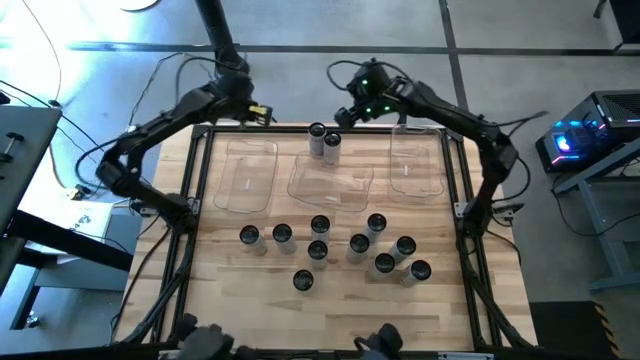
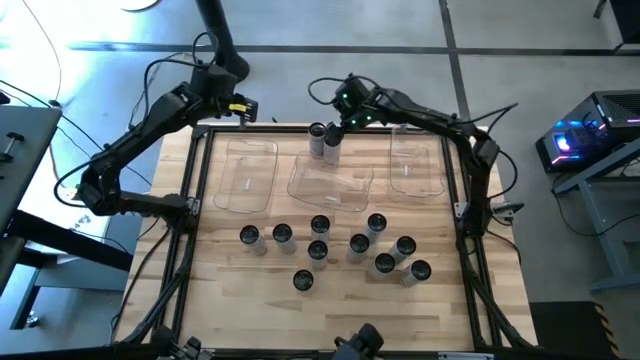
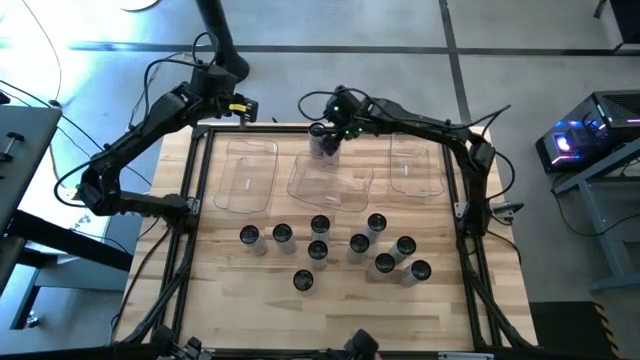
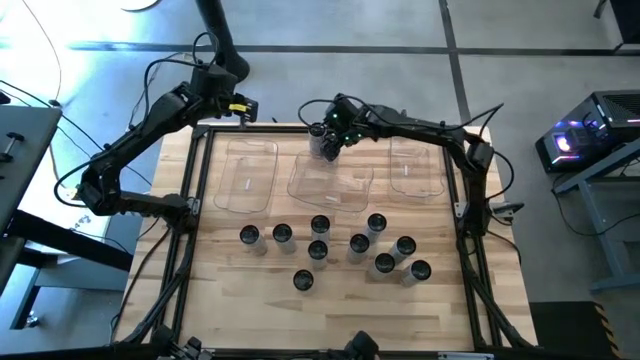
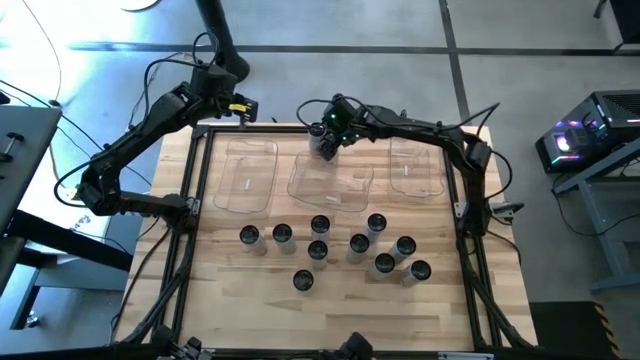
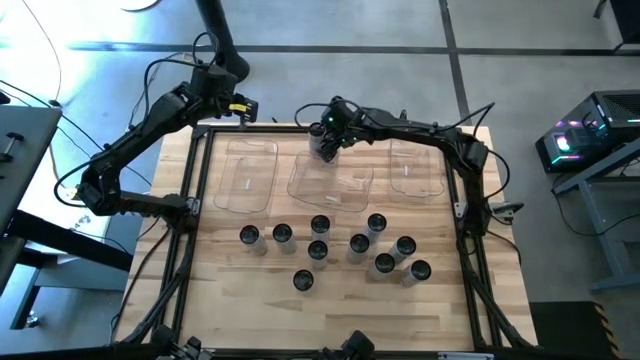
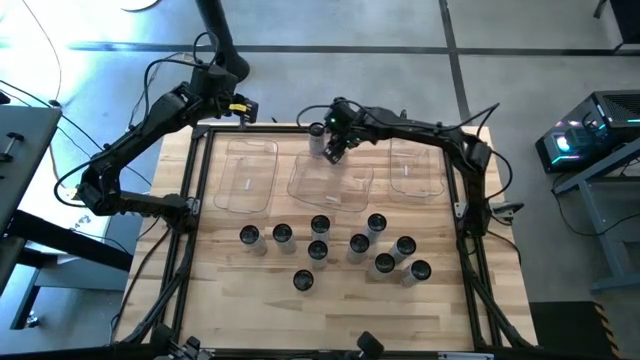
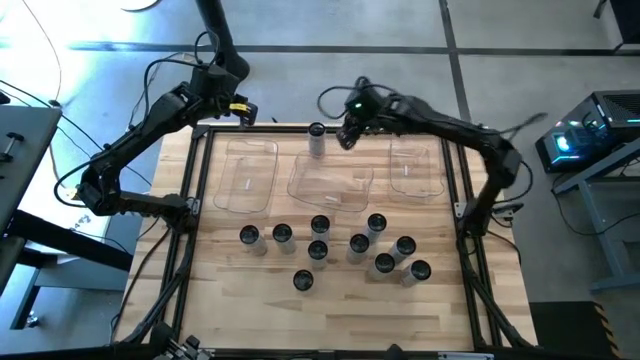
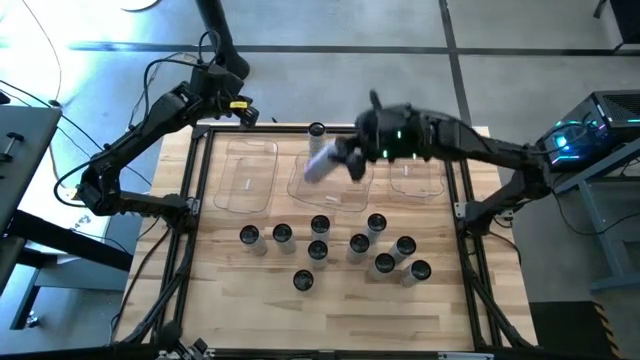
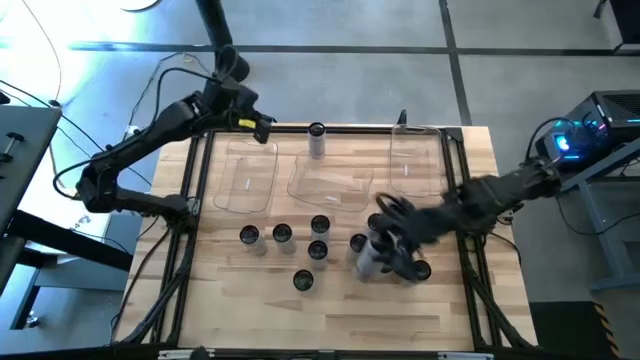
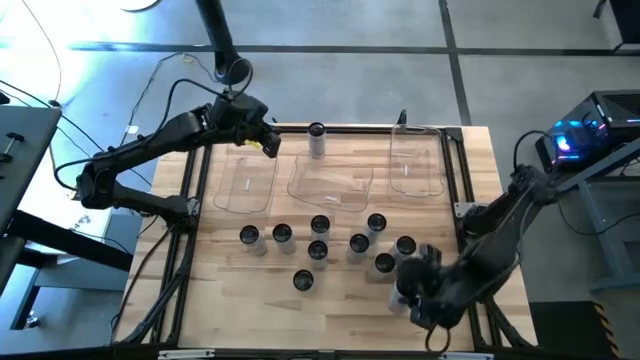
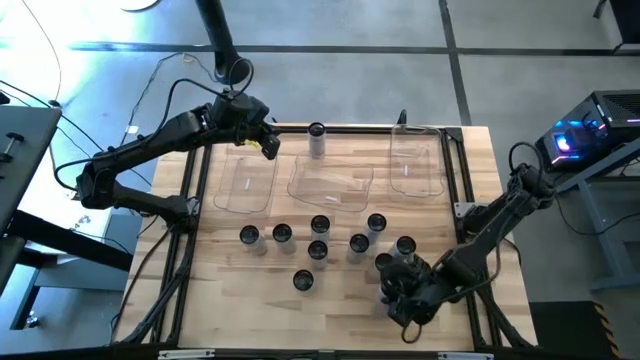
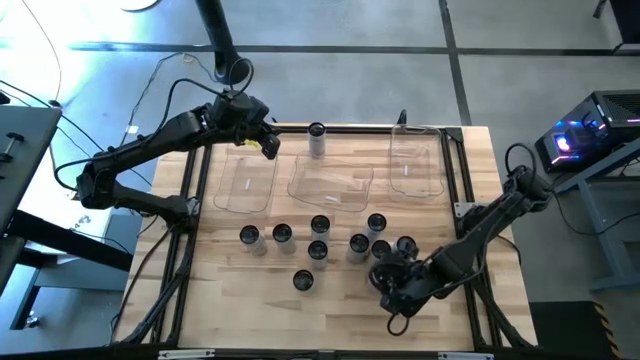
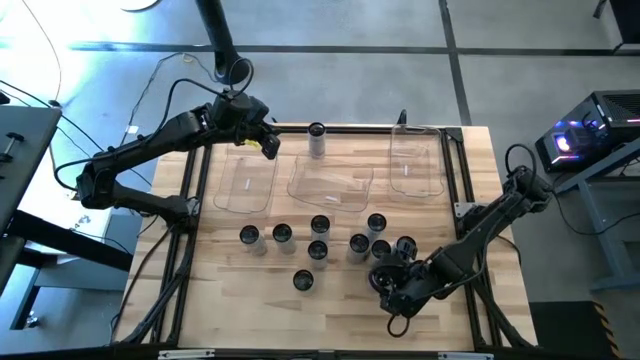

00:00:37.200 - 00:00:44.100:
Task: Sort soda cans
Move the white-pink soda can to the bottom middle of the table

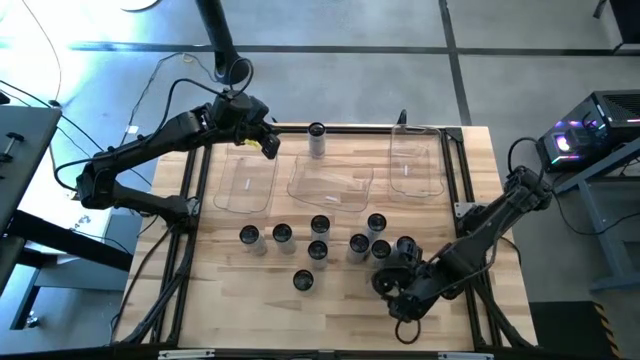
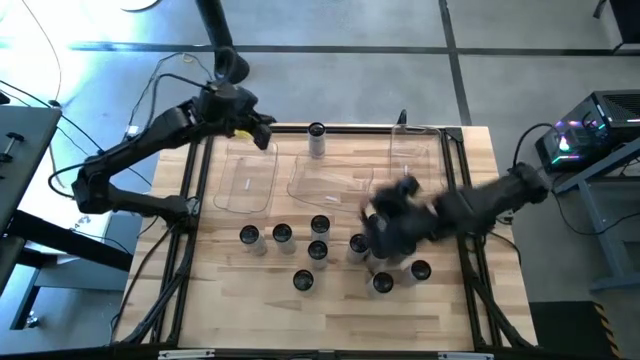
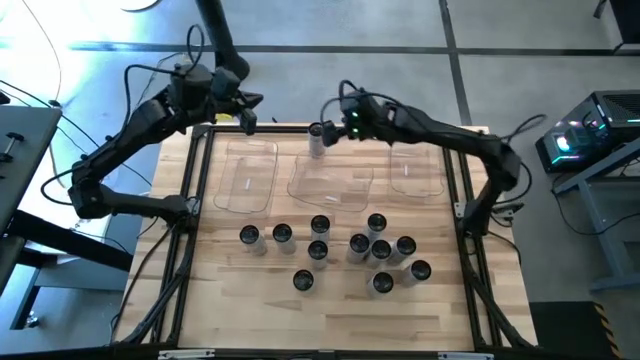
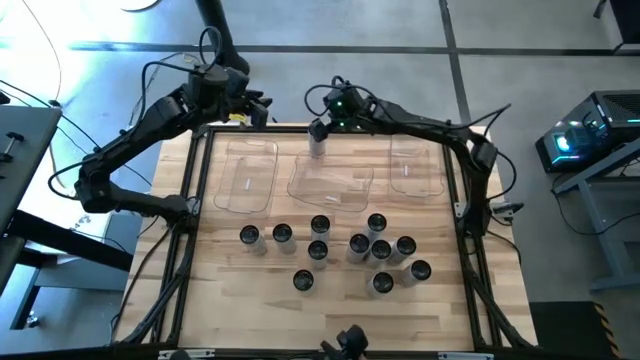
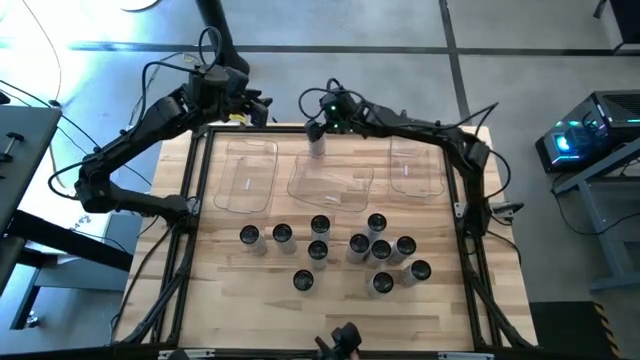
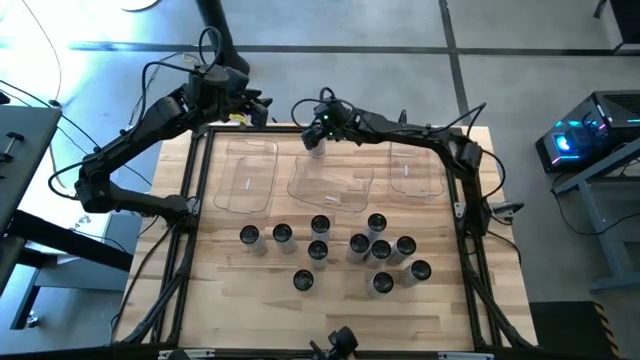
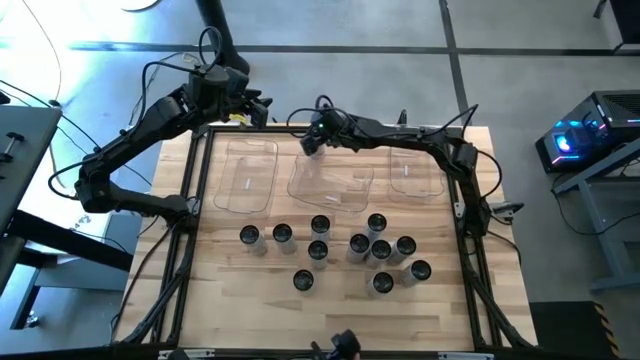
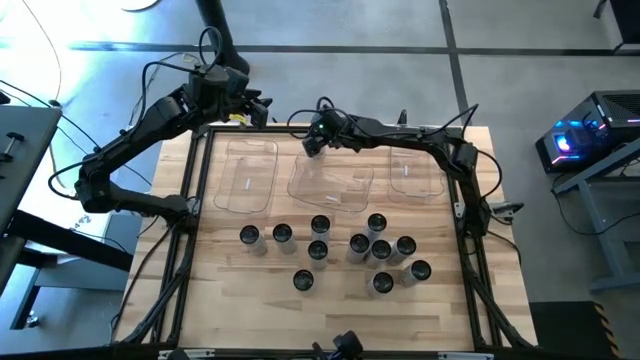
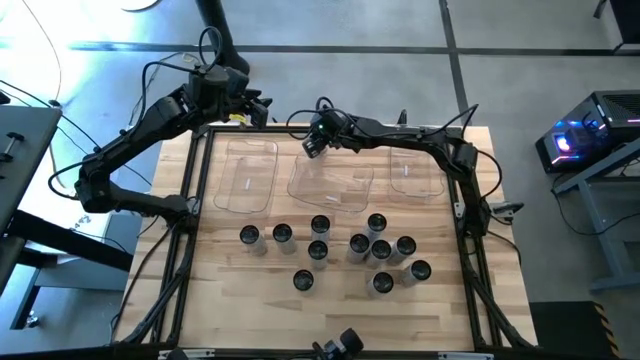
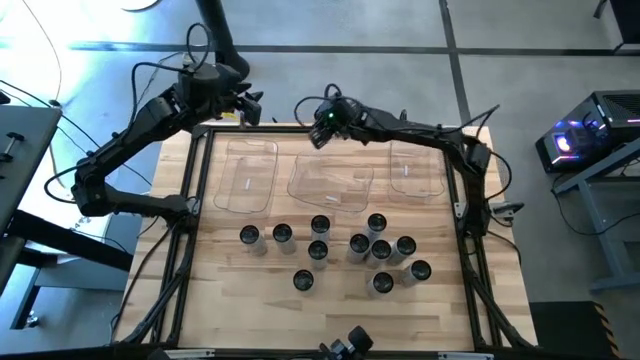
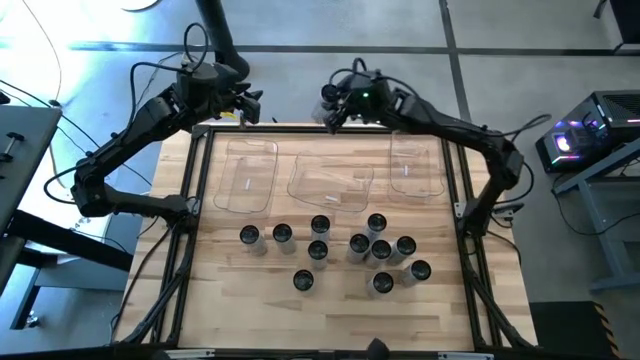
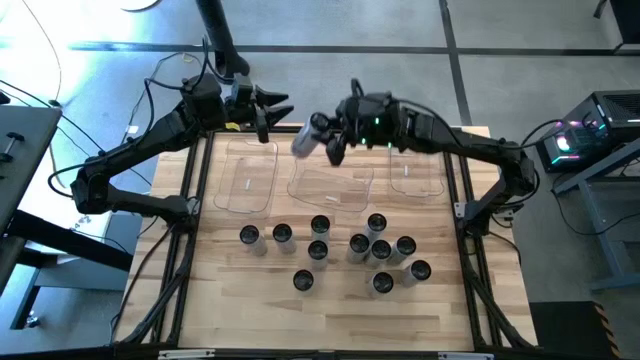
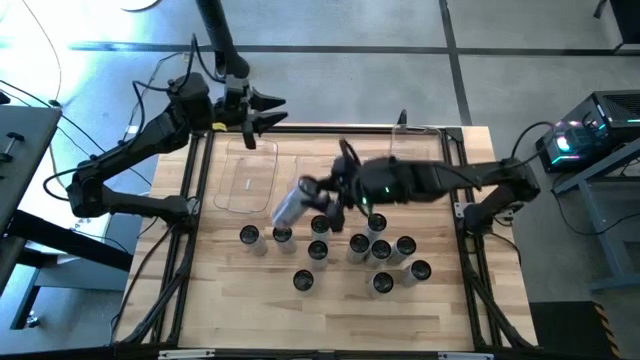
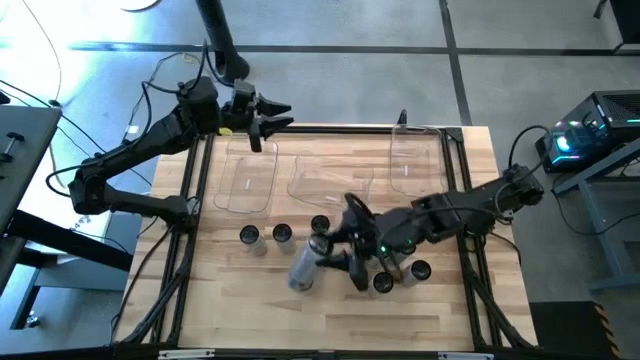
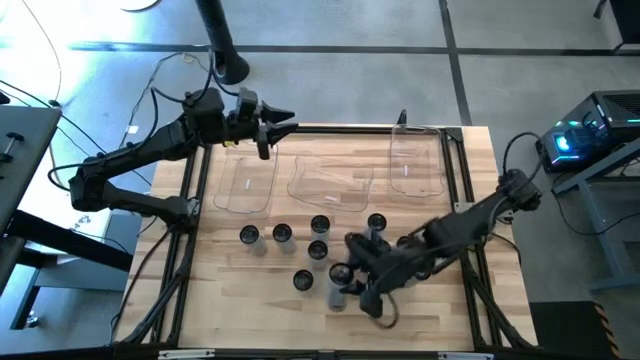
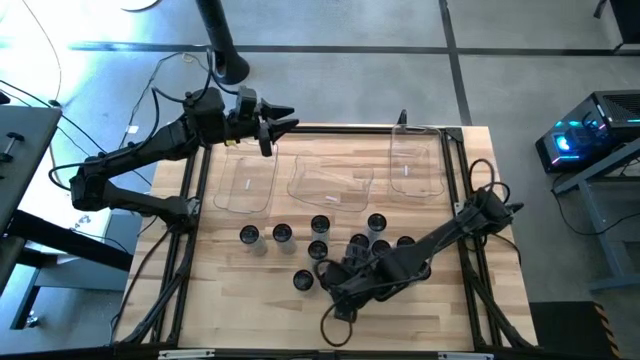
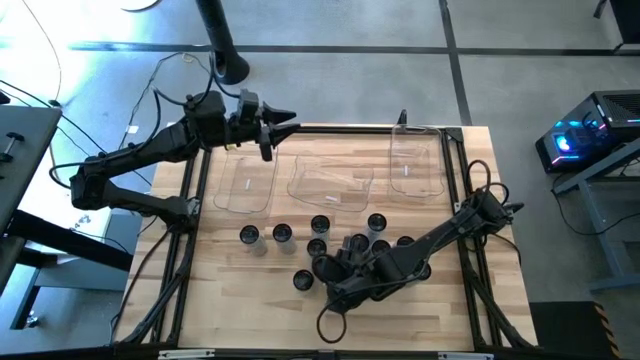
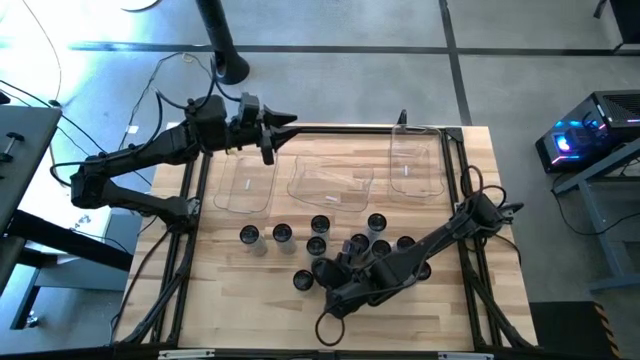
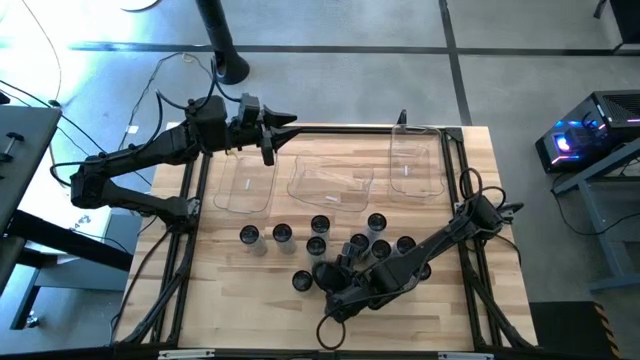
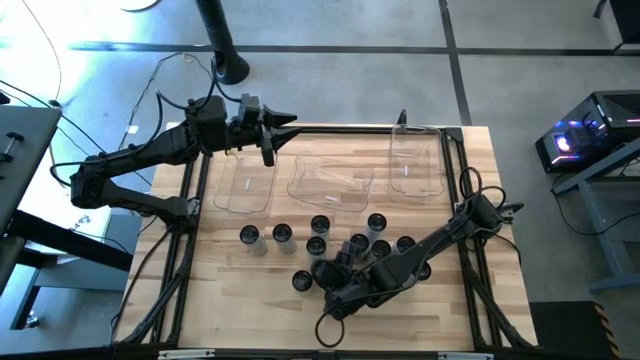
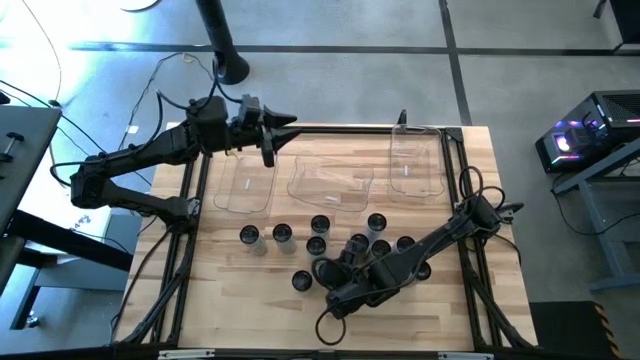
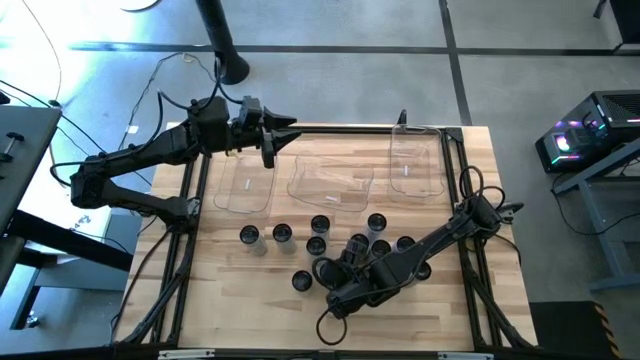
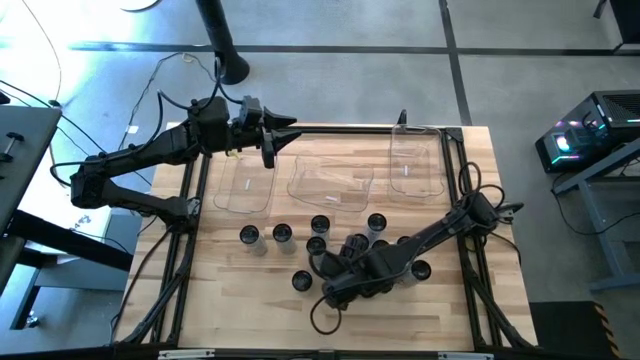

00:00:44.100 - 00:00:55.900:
Move the white-pink soda can to the bottom center of the table

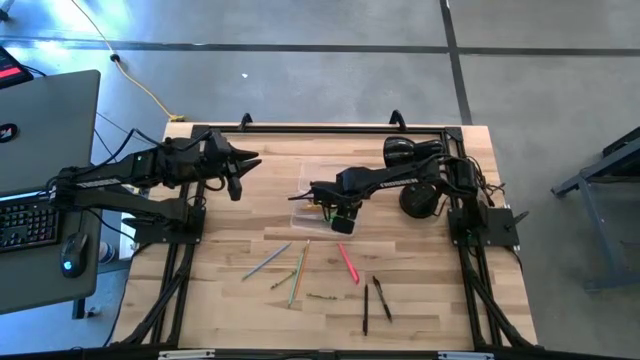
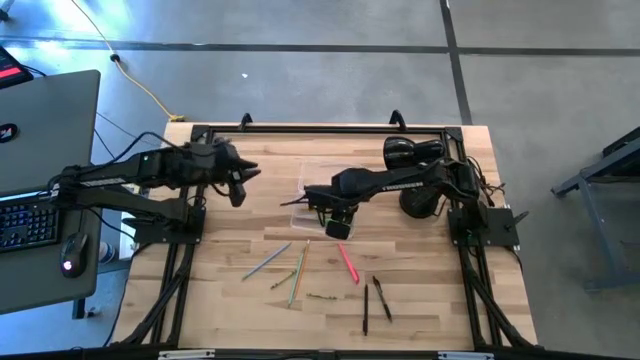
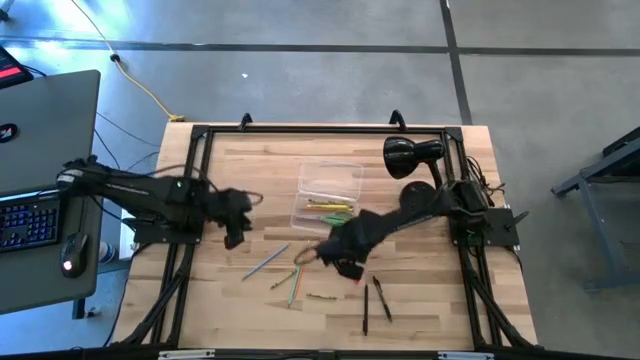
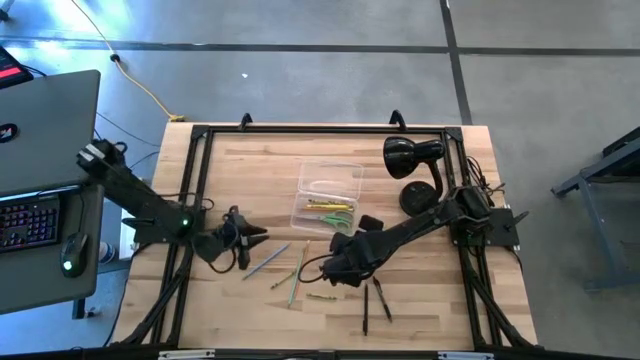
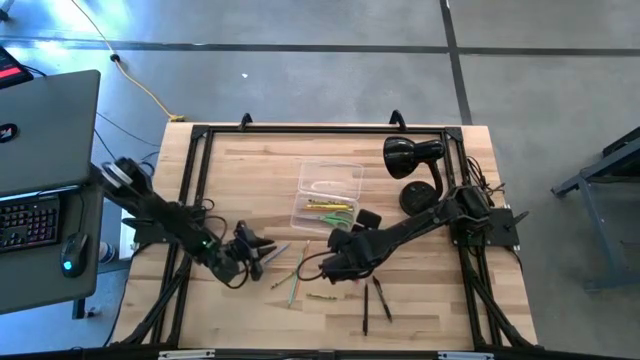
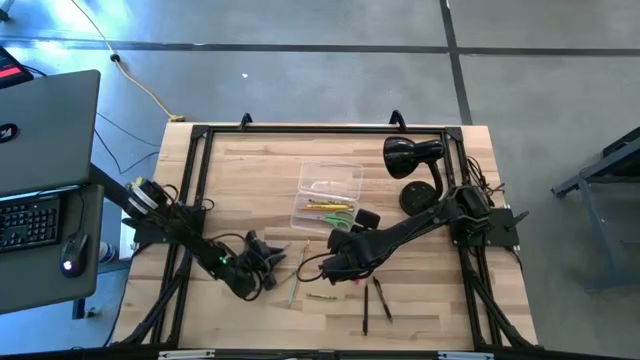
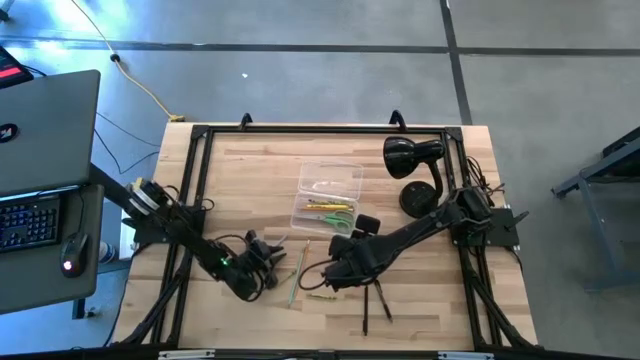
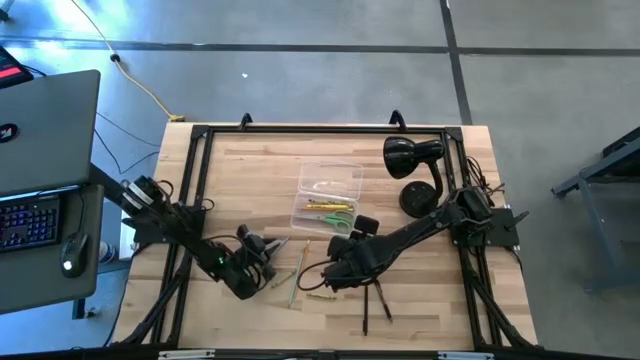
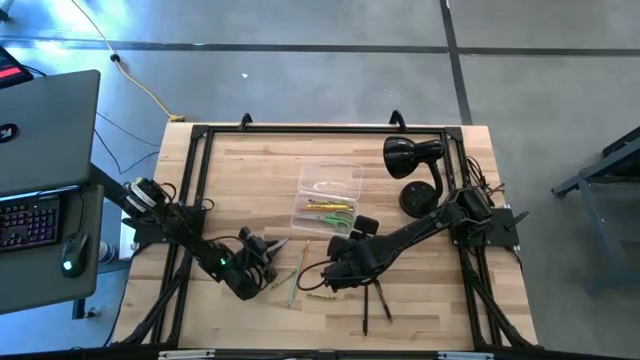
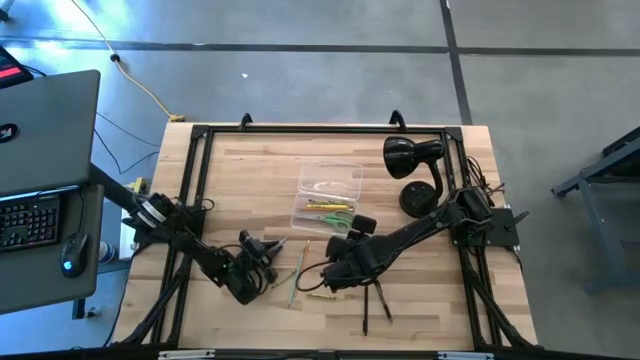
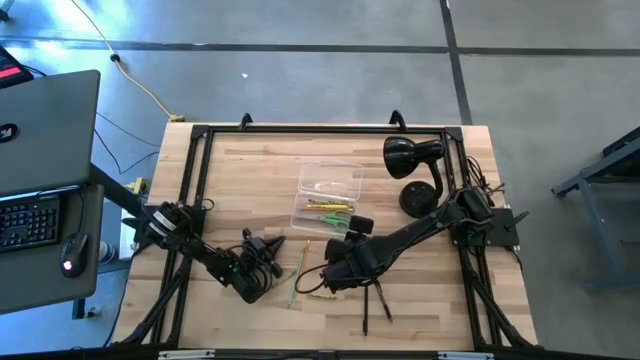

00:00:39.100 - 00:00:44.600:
Task: Pick & place school supplies into a supply box
Put the blue pencil into the transparent supply box
